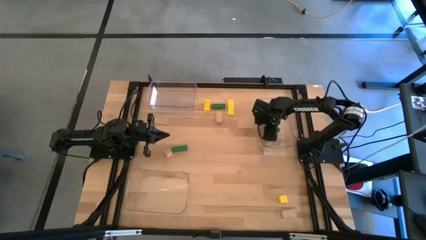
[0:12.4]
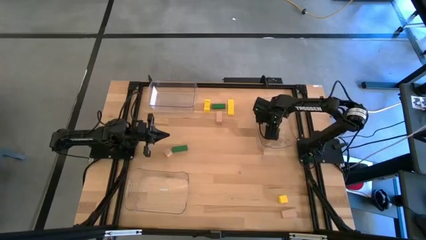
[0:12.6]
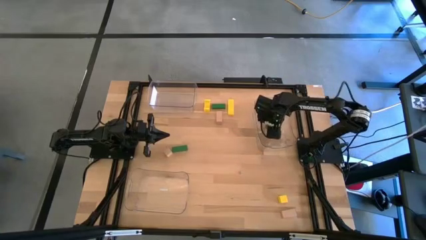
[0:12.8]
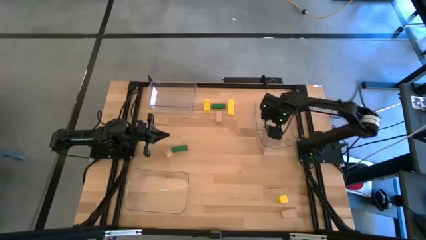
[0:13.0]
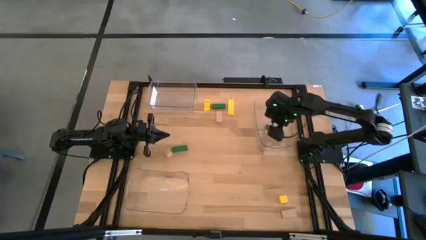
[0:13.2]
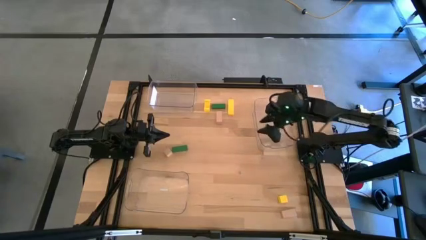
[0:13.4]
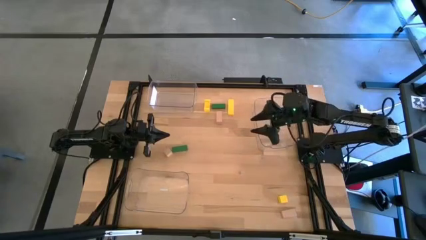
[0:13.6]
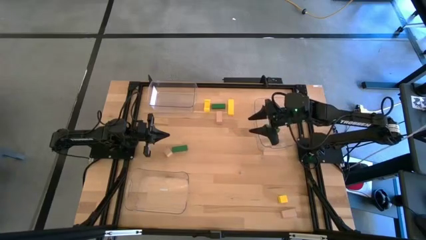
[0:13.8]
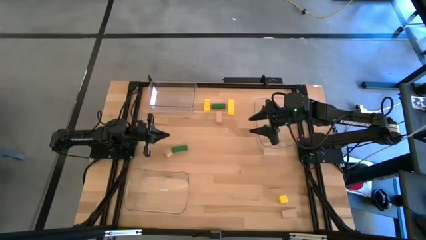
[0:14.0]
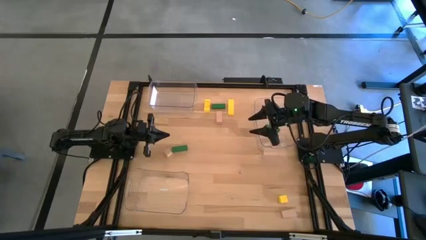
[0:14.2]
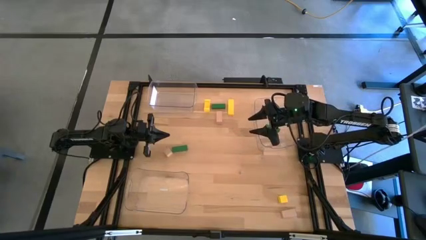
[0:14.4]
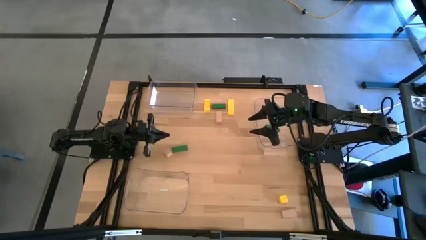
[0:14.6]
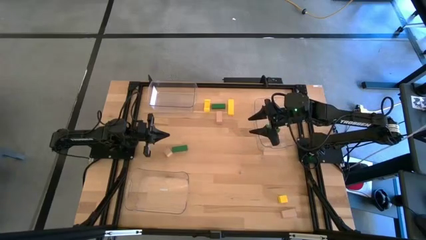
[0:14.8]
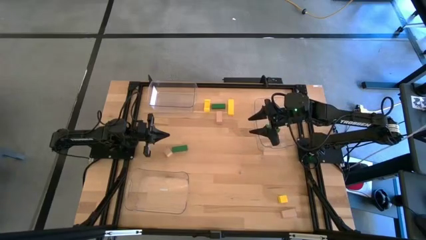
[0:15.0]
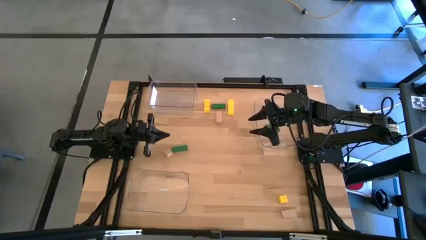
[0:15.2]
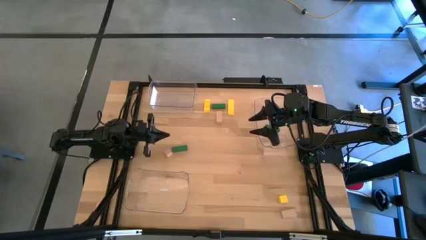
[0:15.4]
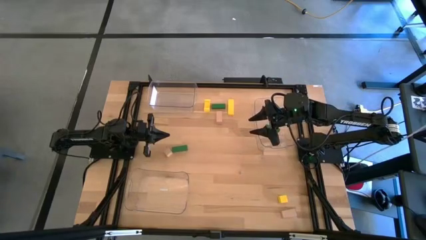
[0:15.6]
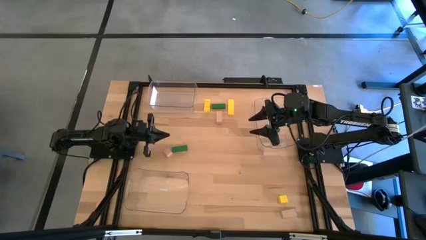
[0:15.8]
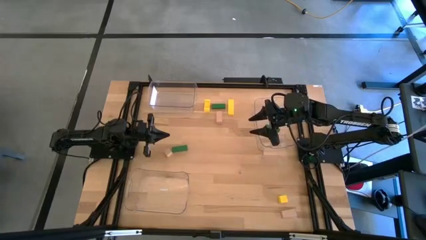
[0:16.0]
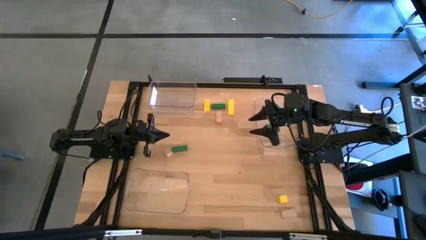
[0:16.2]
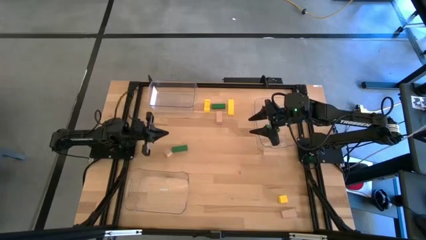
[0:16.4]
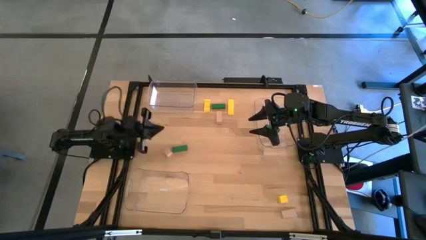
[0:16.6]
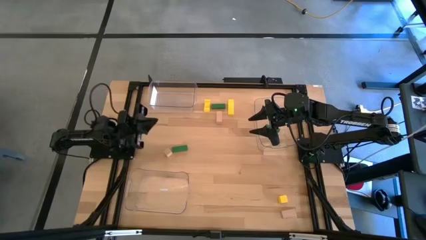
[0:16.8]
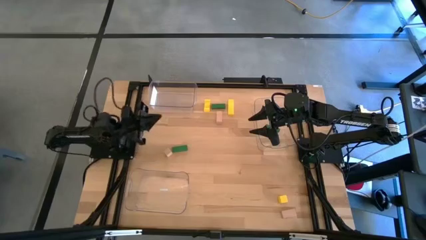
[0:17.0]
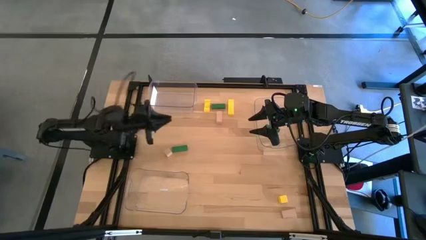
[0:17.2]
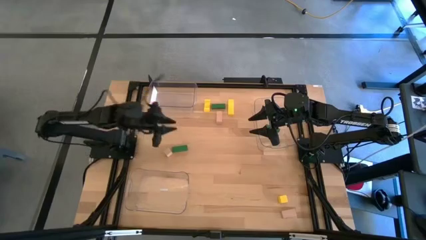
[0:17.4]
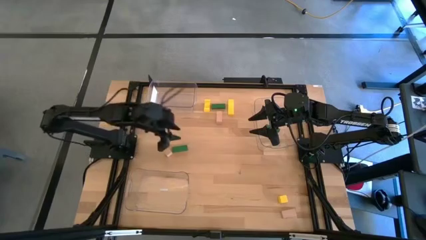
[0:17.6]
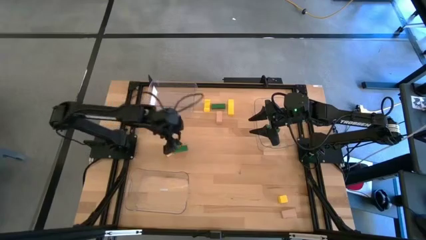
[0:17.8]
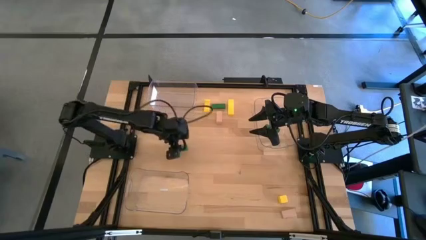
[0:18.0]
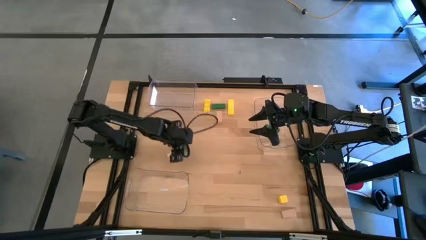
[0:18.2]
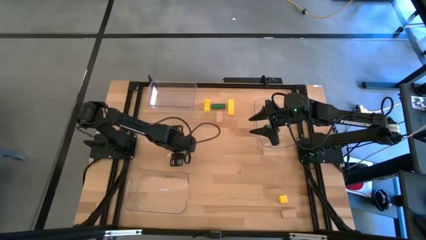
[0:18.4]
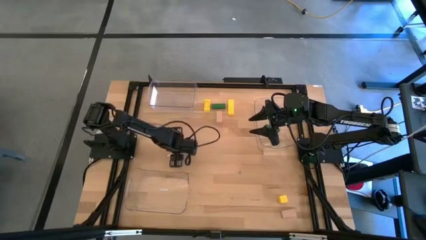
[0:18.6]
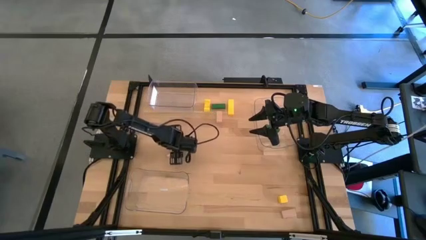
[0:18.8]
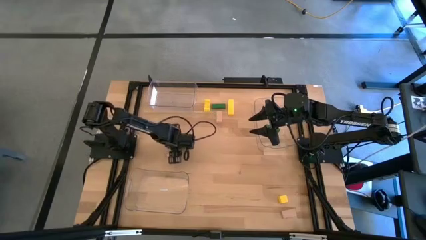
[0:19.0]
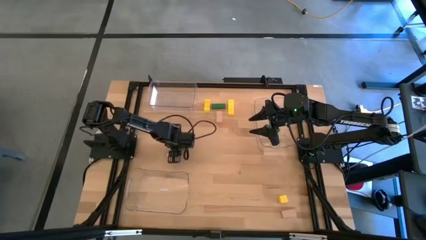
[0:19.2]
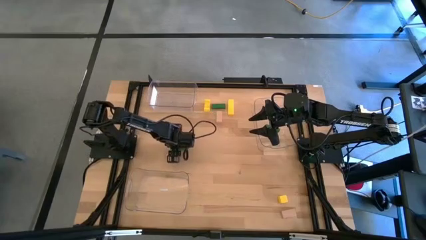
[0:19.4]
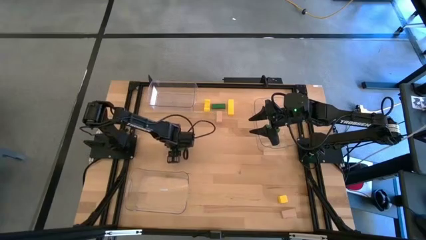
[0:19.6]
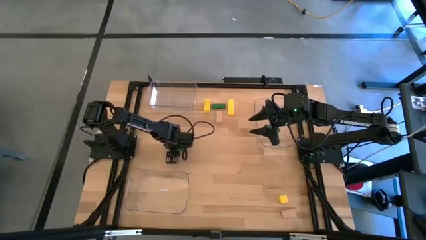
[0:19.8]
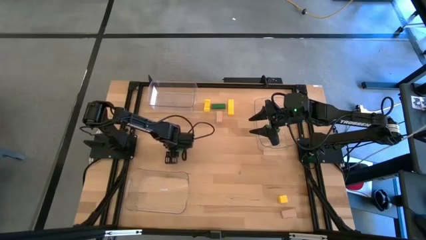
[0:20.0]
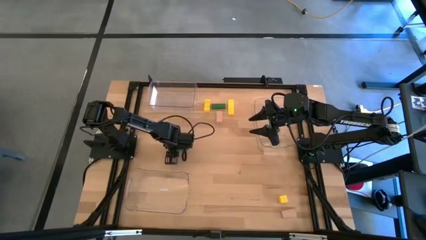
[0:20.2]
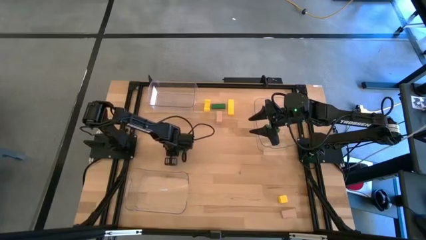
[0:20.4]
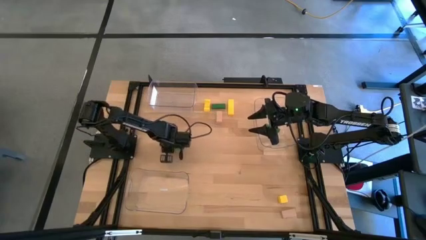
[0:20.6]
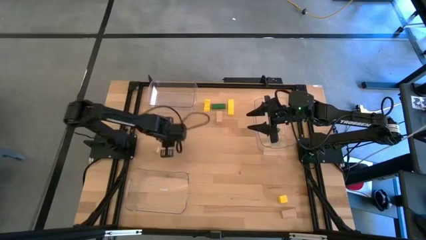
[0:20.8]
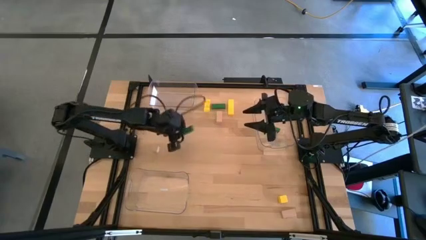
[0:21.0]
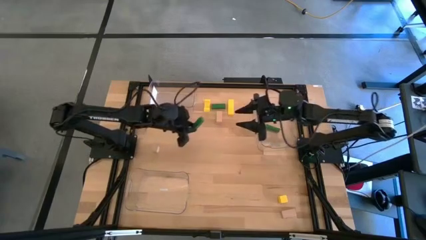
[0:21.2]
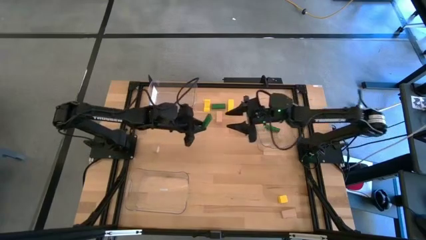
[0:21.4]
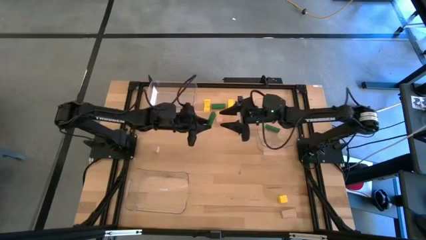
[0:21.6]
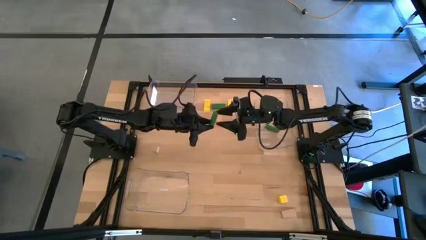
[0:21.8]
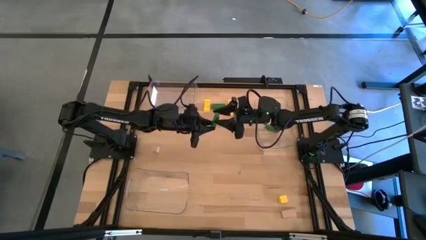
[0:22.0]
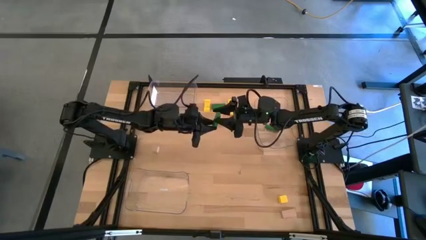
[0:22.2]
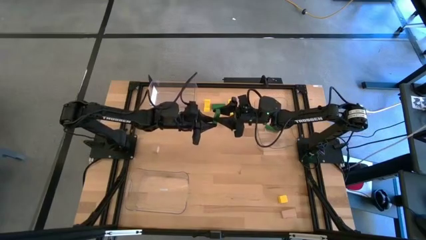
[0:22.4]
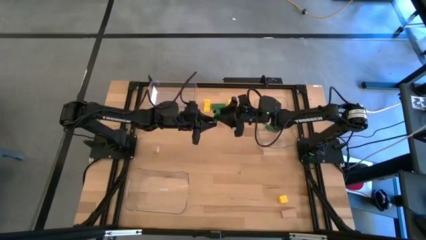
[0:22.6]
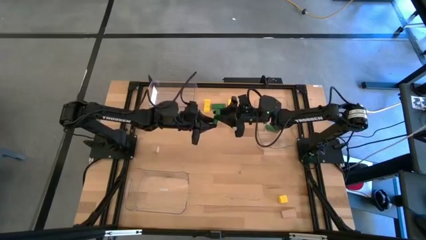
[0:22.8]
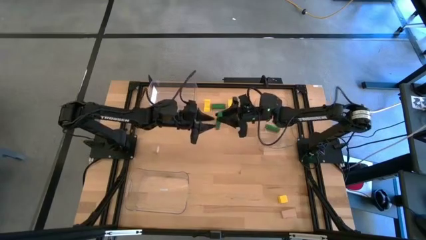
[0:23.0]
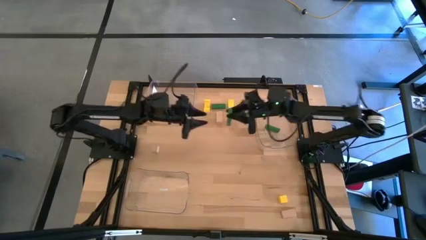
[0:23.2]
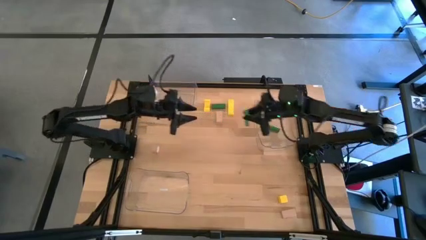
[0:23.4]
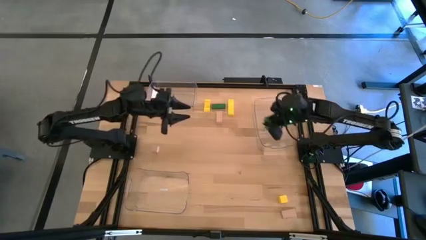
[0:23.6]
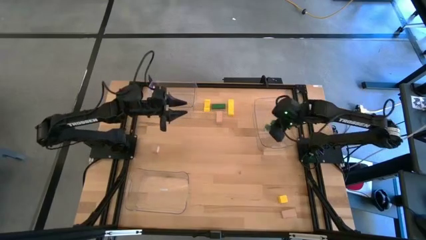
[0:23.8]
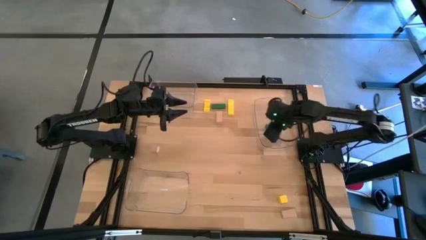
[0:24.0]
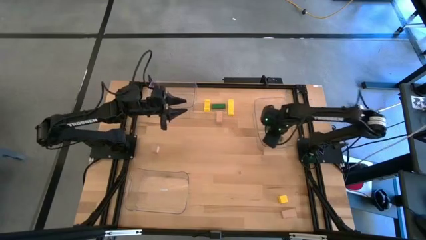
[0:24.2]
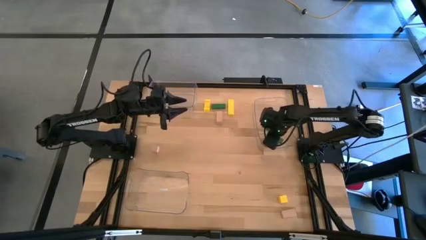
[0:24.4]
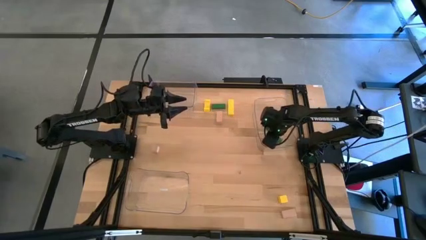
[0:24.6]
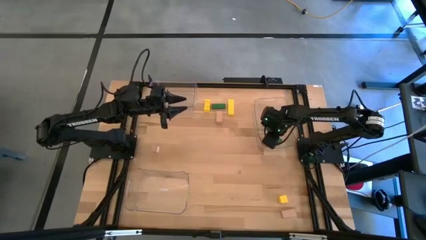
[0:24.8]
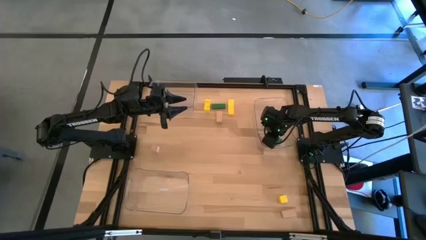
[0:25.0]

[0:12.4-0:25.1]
Task: Sort & place blocks by color
Put the bottom green block into the top right transparent bin

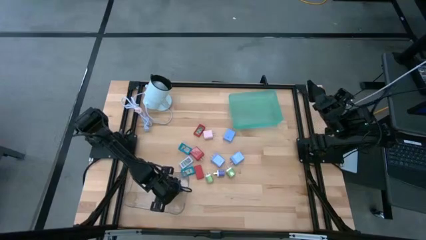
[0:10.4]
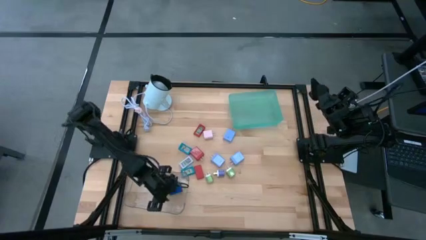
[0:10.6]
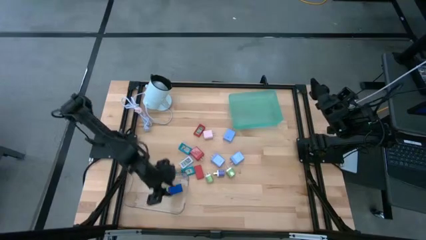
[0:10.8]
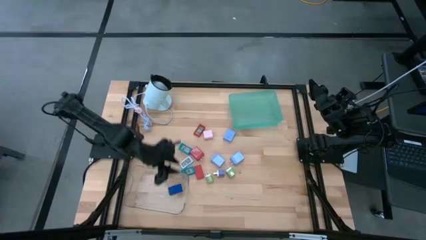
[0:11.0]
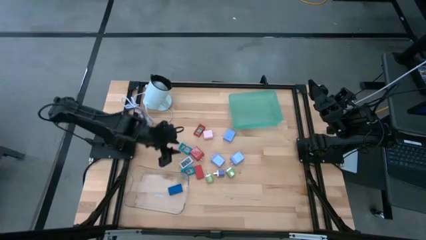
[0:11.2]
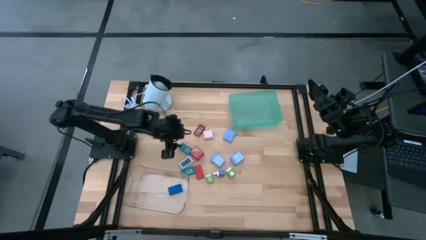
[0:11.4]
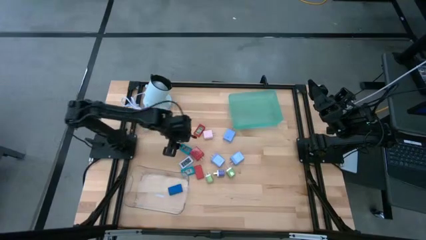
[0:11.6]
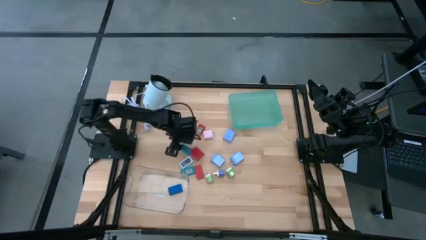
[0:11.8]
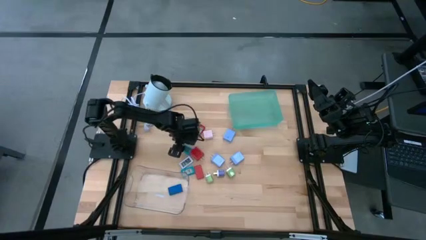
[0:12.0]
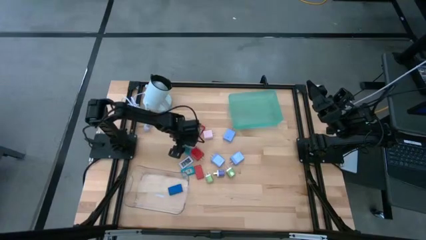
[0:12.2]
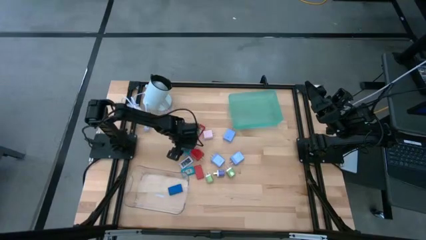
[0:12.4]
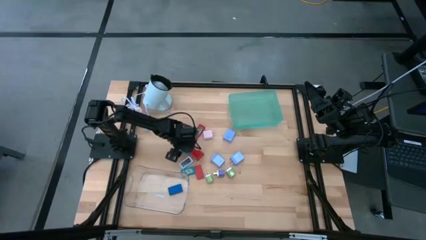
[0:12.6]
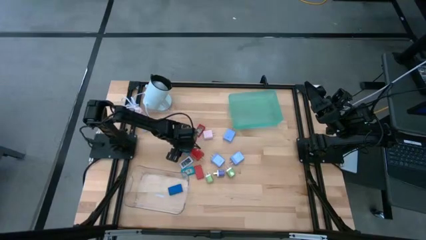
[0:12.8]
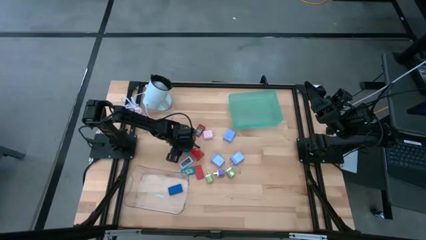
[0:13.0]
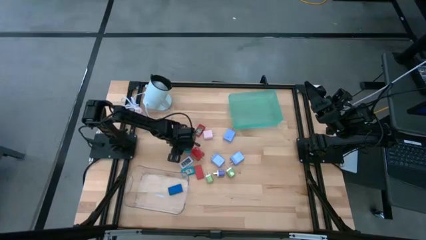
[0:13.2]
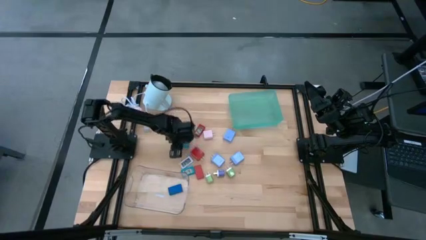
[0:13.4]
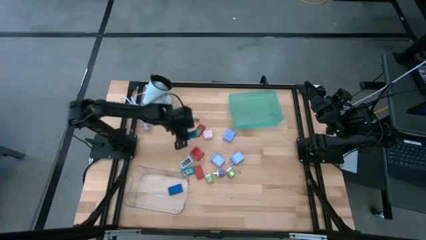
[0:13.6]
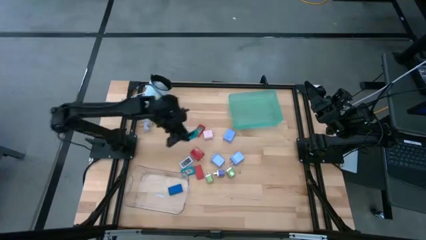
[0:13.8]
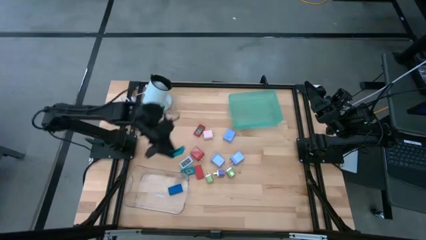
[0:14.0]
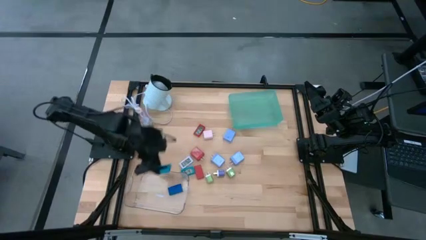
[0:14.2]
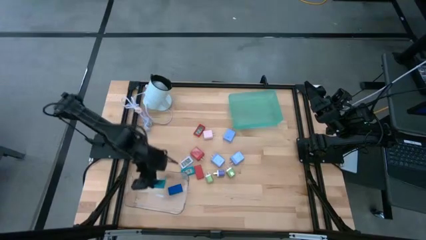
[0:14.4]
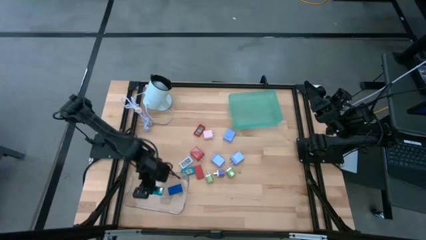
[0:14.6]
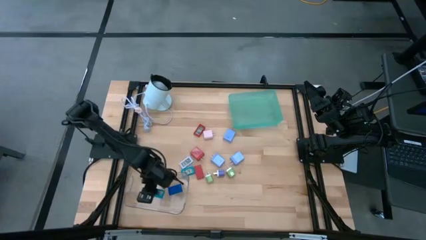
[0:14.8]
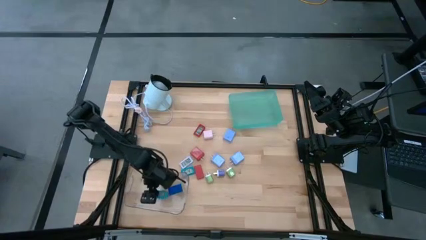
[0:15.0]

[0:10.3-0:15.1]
Task: Pick & Place Office items
Put the light blue digital clock into the transparent bin
